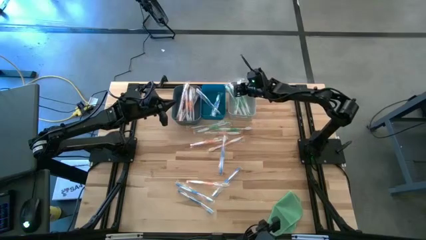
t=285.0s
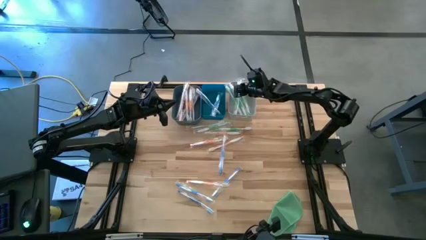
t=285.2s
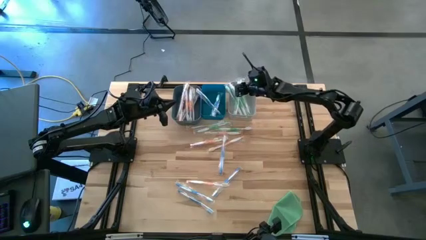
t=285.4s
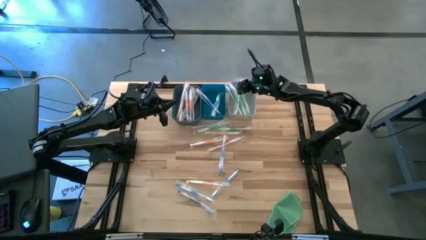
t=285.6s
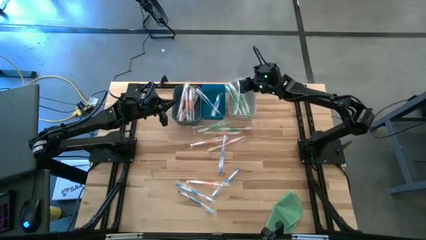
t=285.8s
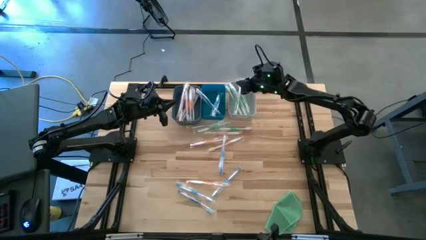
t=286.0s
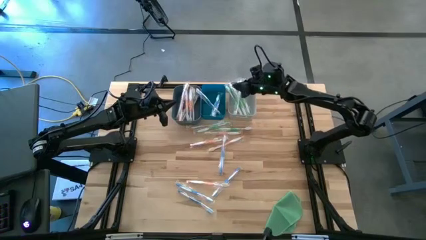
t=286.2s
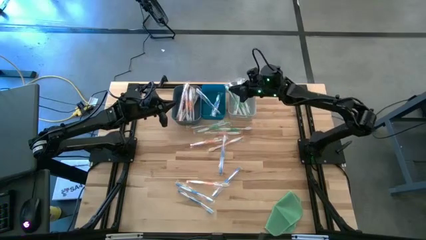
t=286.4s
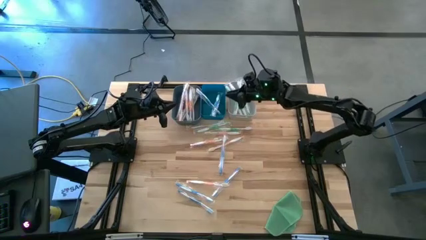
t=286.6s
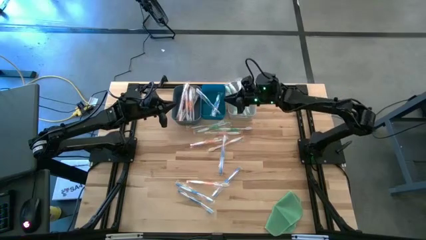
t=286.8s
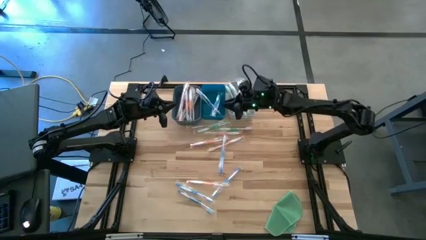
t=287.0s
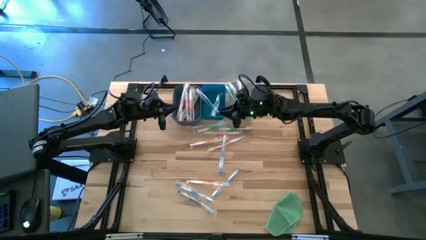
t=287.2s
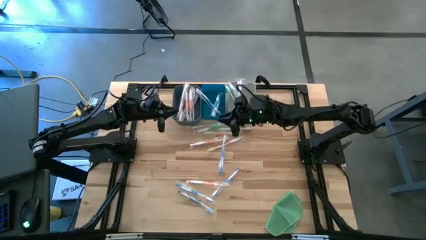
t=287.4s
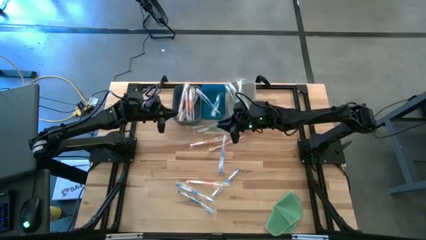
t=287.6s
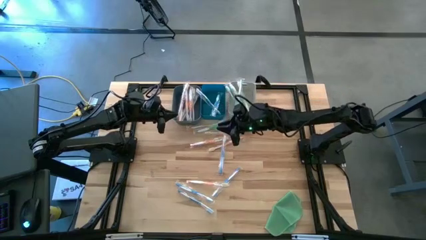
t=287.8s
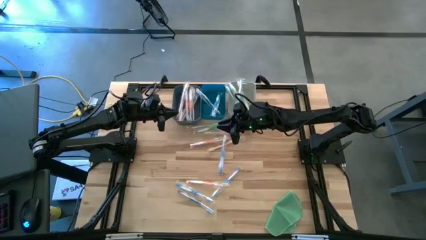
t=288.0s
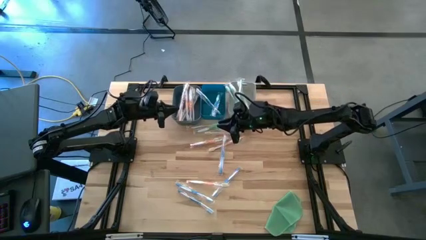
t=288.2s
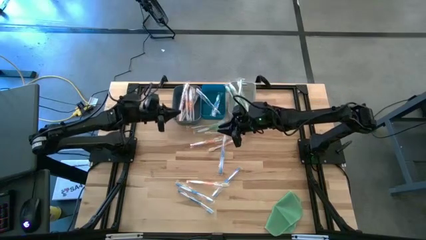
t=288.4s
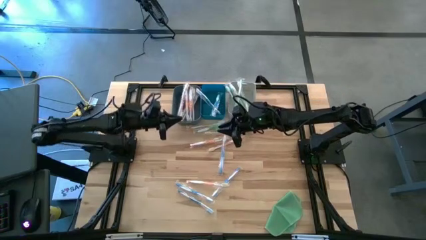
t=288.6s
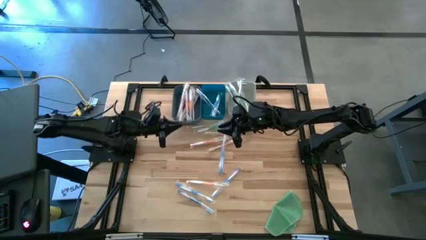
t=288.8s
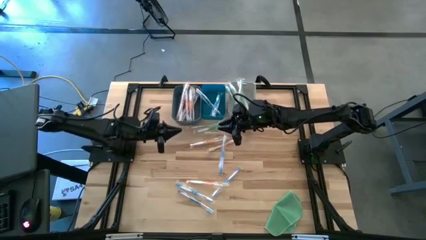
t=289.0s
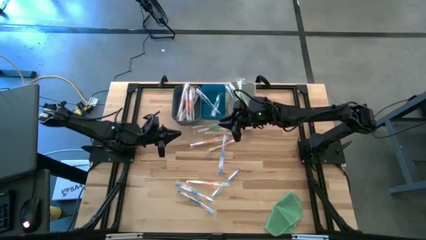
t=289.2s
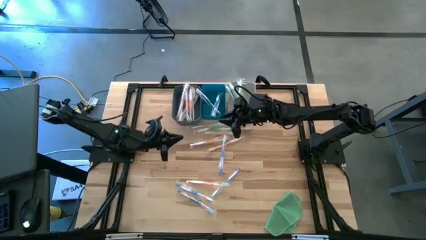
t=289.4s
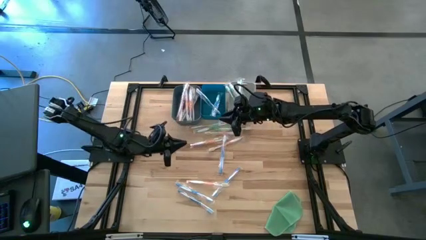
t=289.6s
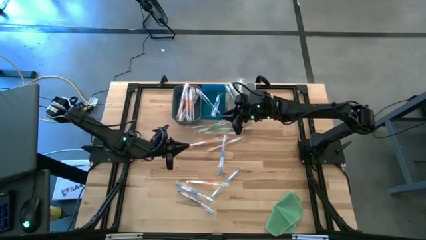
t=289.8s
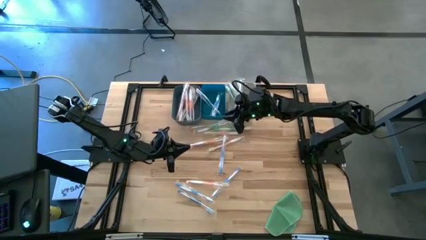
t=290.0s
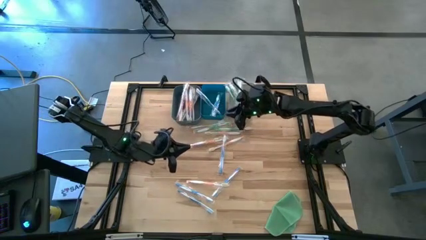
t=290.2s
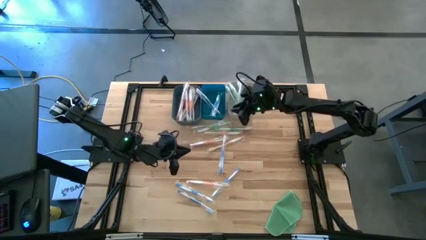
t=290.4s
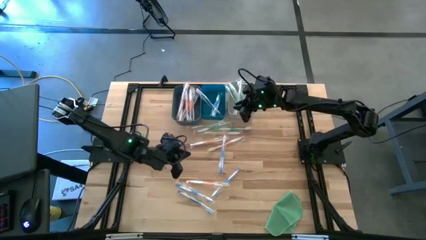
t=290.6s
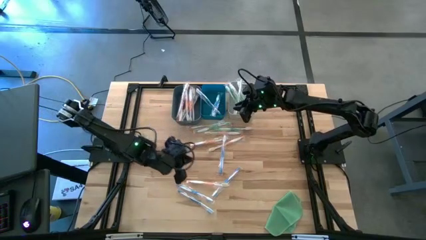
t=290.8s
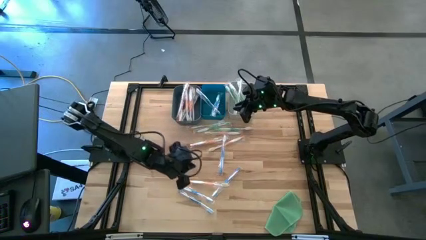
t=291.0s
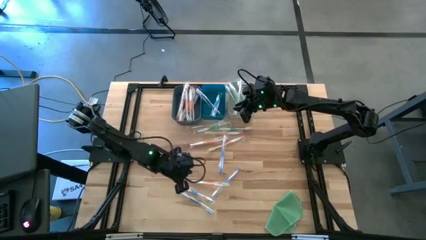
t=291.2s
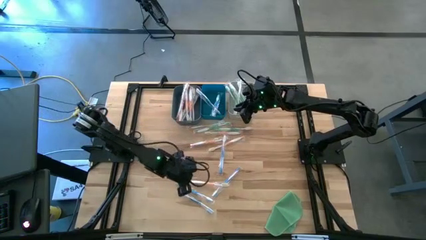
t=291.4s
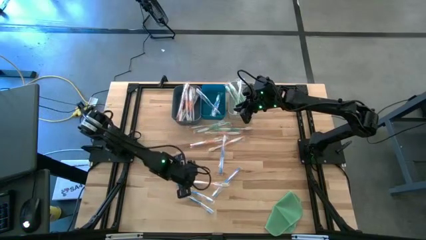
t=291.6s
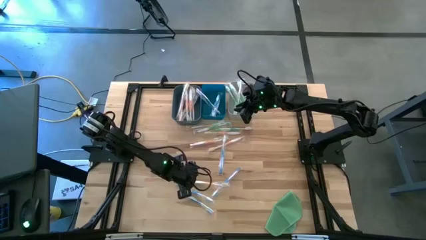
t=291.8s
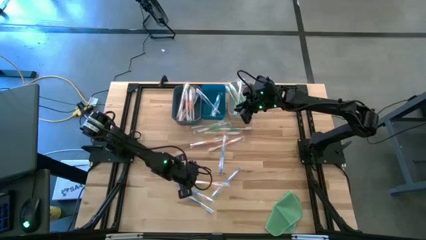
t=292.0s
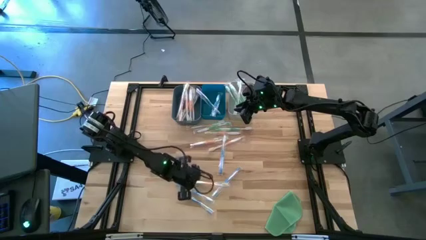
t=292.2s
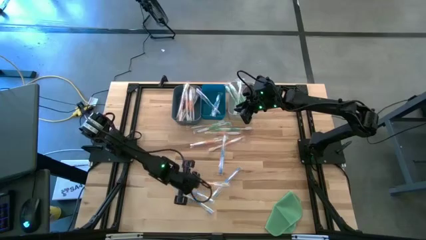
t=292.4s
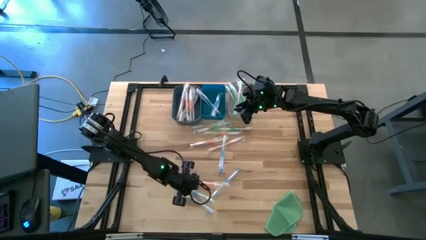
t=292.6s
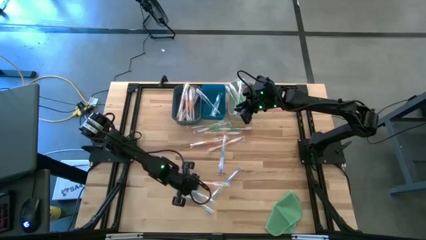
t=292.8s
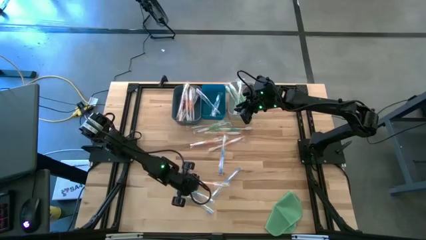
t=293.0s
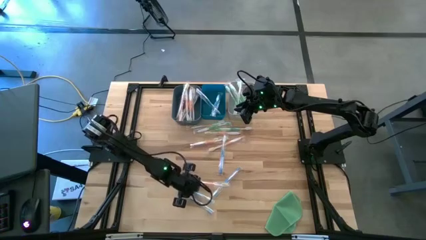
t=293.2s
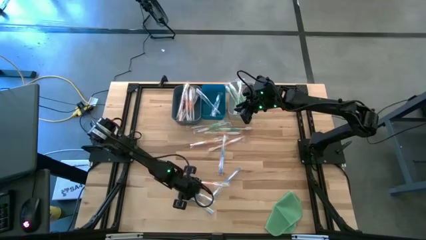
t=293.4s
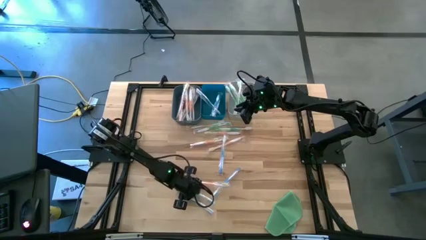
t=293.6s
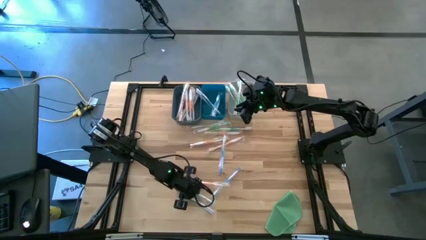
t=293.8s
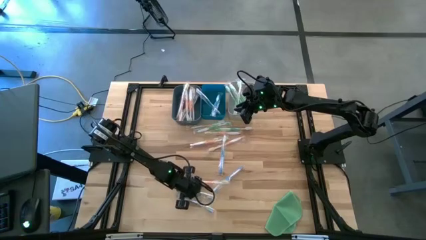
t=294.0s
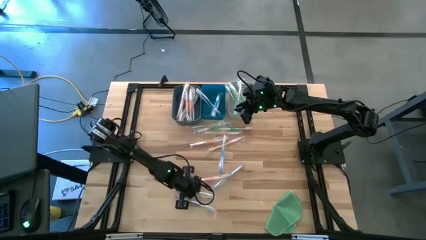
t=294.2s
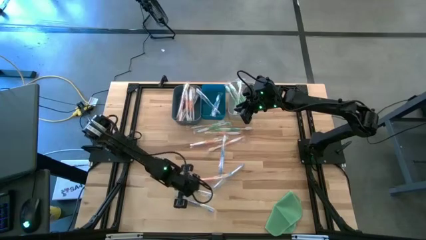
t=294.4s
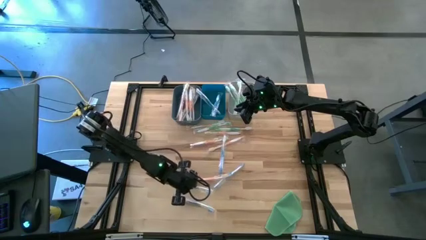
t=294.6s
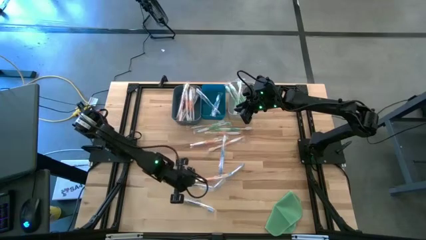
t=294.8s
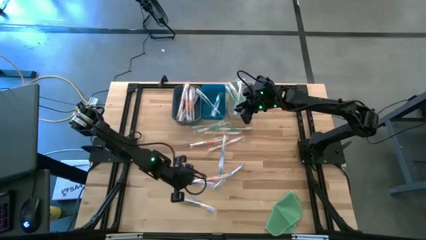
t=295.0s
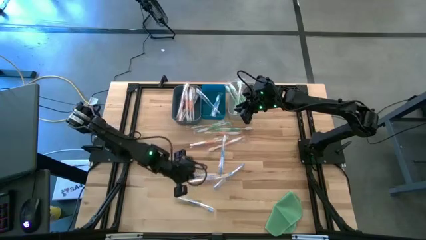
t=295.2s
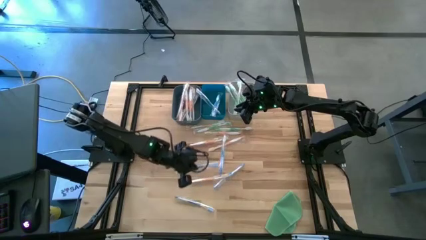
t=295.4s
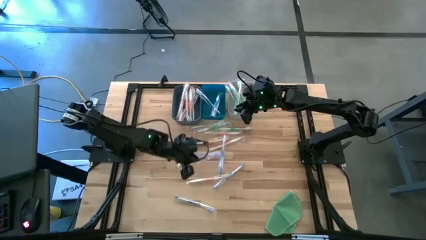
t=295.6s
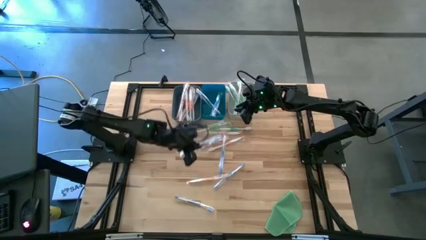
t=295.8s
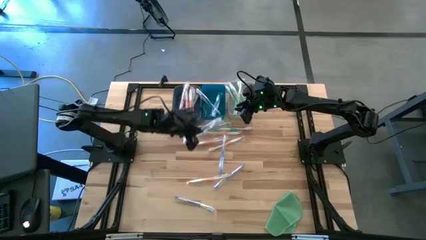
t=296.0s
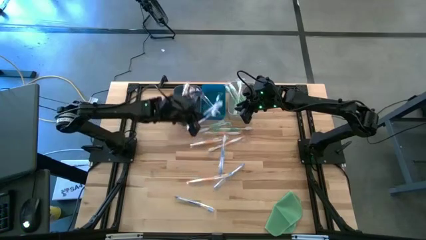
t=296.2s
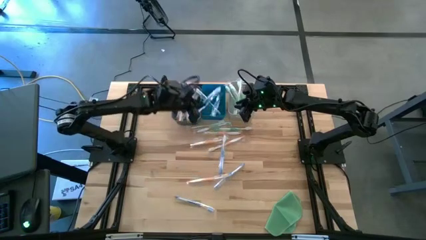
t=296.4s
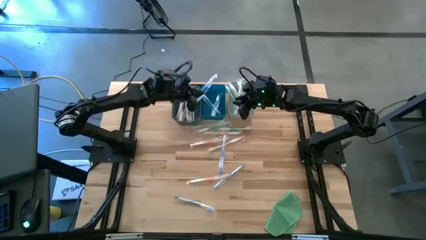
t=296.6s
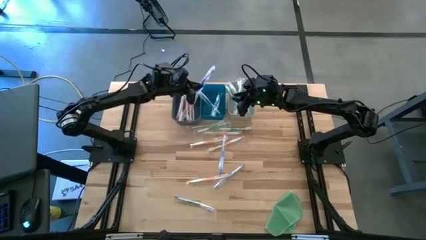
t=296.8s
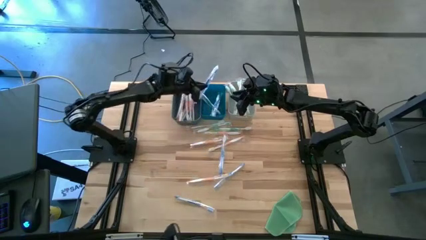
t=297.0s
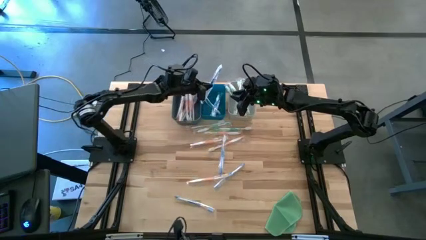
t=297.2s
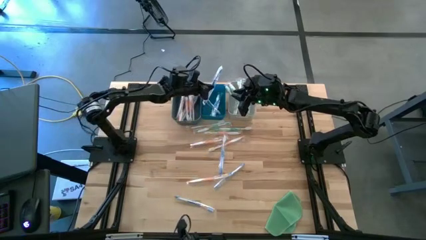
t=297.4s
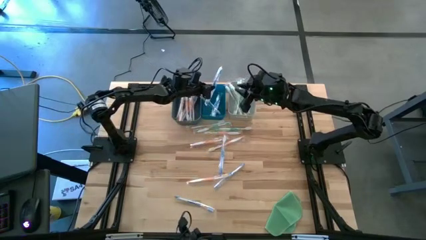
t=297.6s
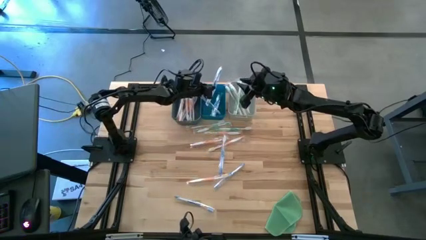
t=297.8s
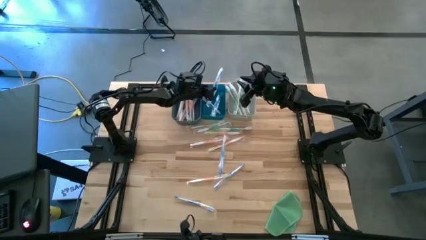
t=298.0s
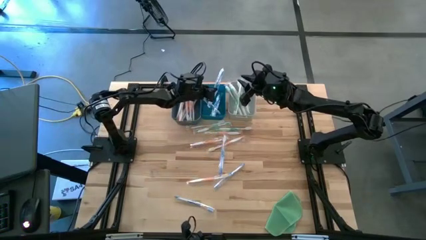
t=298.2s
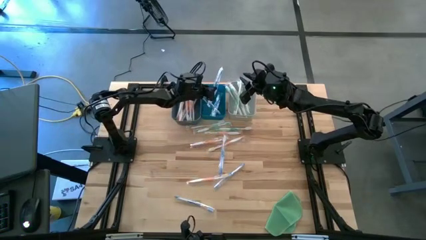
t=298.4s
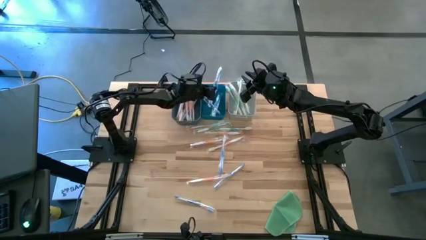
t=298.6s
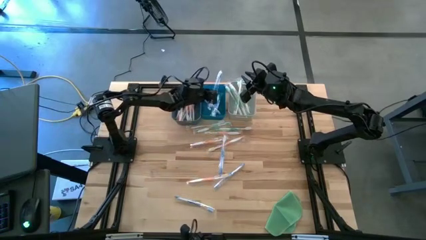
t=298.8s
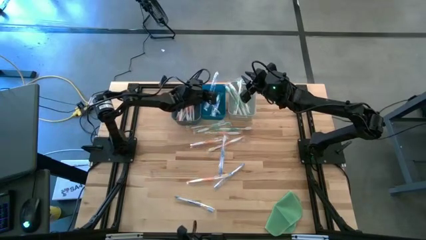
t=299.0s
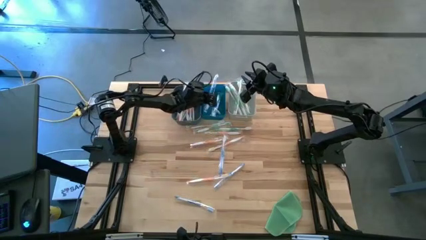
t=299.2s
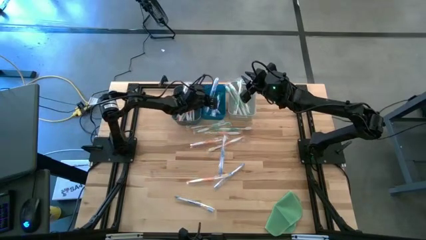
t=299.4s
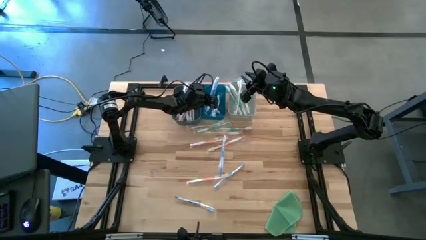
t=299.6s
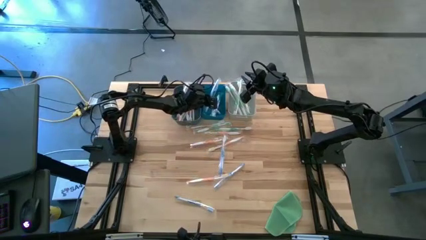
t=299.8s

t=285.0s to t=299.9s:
Task: Pick & Place Toothbrushes
Put the blue toothbrush into the blue bin

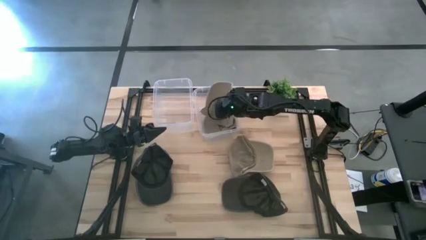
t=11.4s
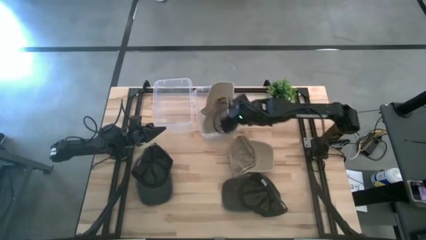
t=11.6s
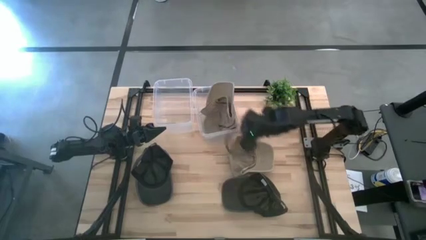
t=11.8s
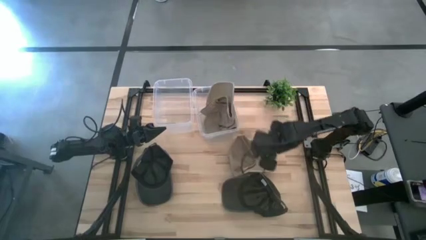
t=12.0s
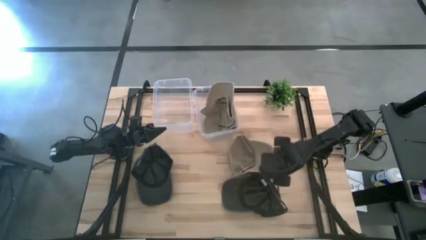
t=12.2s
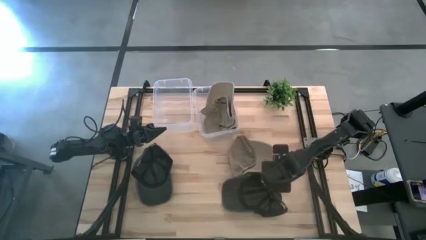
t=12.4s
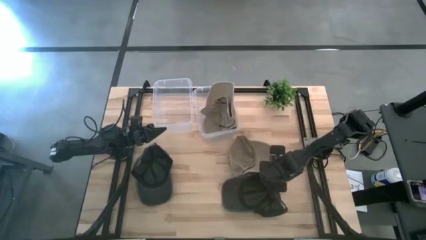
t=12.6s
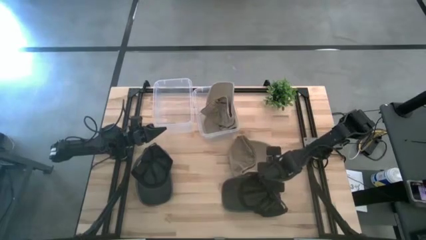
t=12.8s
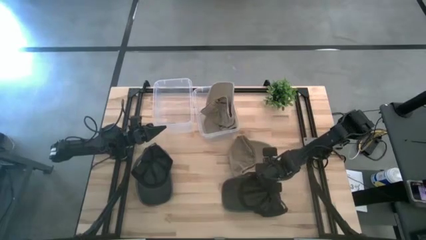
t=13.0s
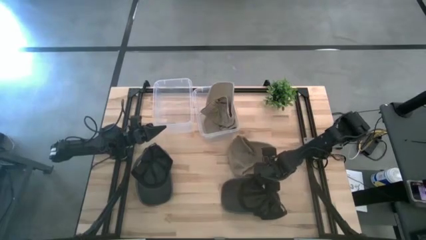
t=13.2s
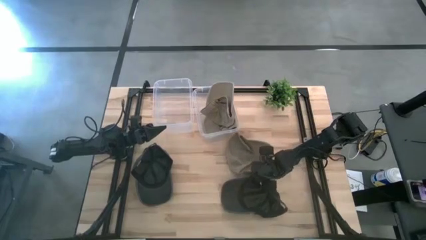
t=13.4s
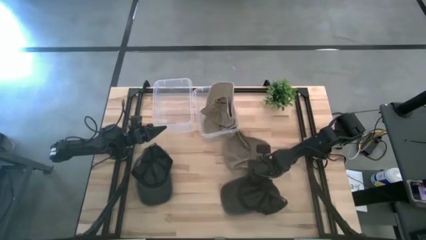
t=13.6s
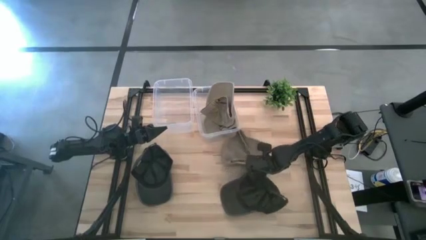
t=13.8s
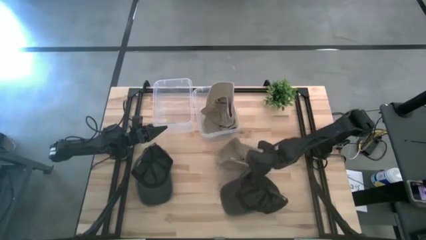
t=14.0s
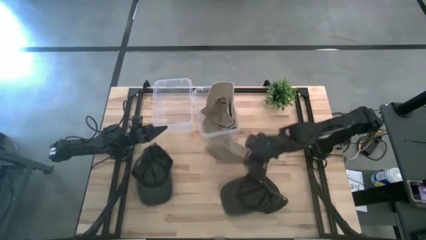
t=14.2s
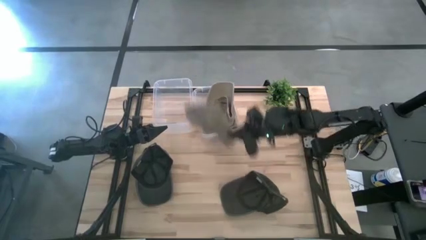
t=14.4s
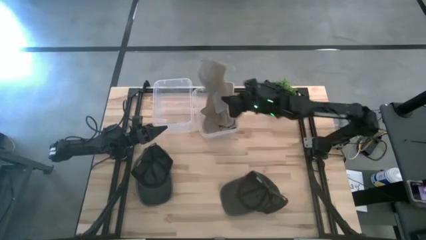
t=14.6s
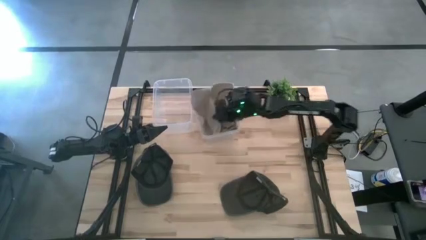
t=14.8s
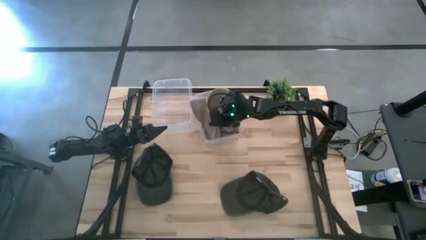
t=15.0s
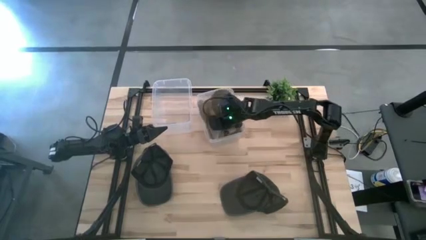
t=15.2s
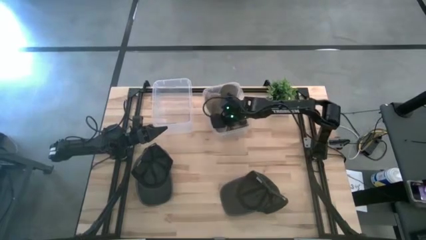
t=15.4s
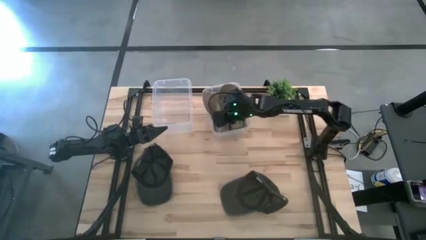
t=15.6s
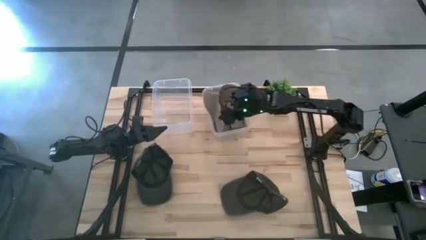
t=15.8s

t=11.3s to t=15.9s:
Task: Pick & Place hat
Put the brown cap into the right transparent bin
